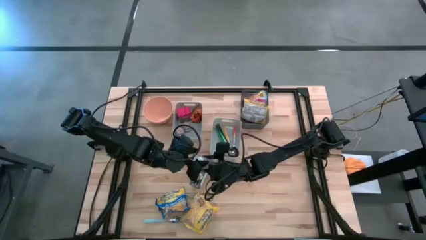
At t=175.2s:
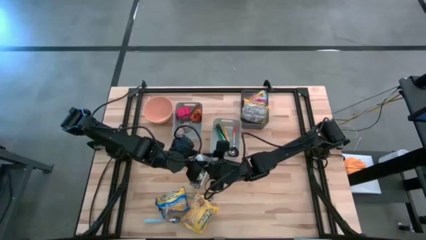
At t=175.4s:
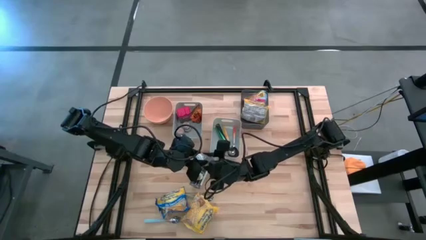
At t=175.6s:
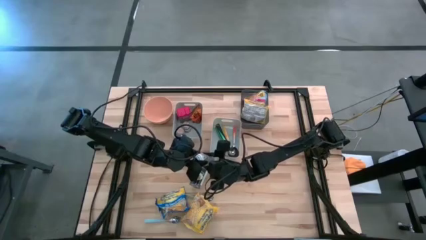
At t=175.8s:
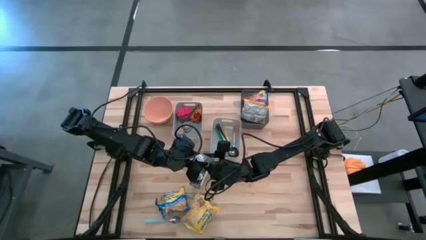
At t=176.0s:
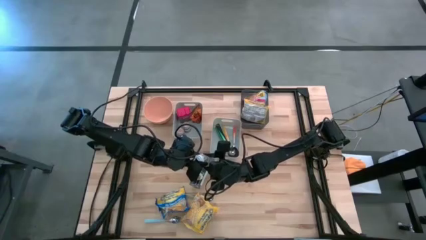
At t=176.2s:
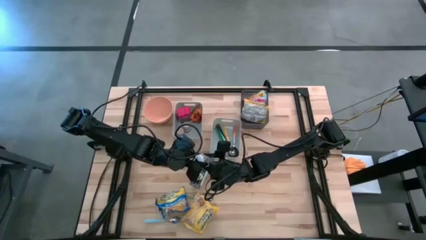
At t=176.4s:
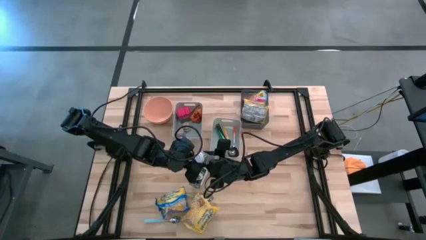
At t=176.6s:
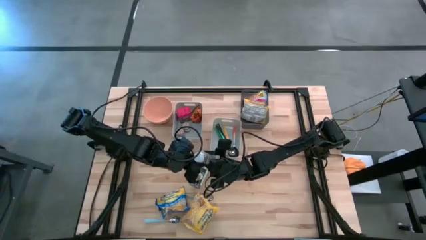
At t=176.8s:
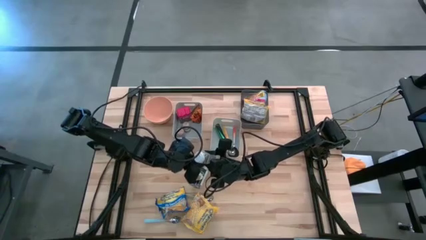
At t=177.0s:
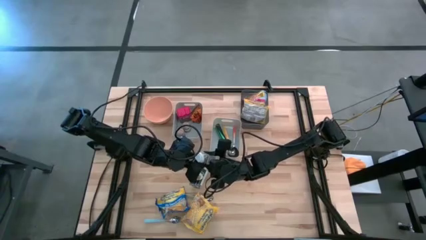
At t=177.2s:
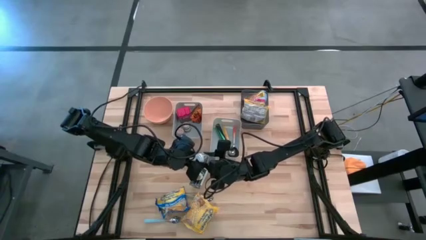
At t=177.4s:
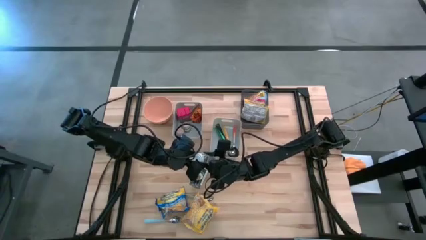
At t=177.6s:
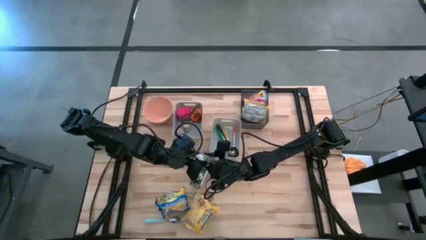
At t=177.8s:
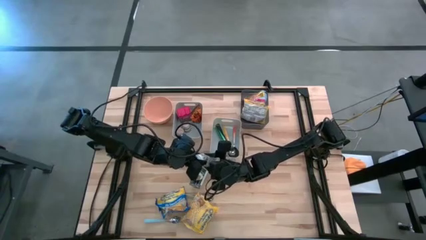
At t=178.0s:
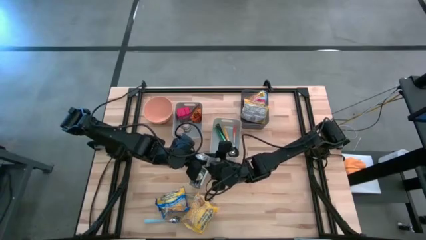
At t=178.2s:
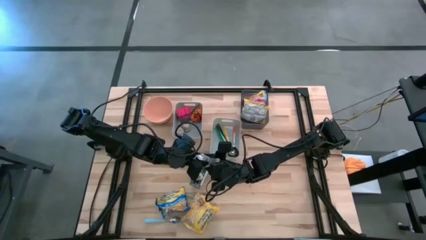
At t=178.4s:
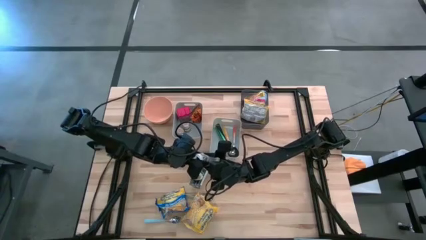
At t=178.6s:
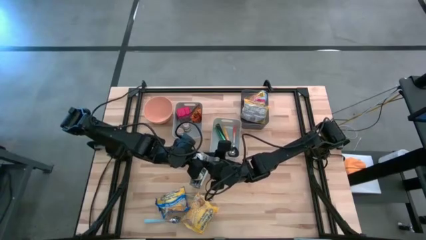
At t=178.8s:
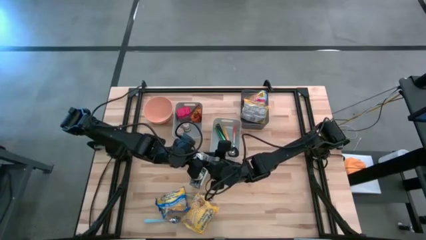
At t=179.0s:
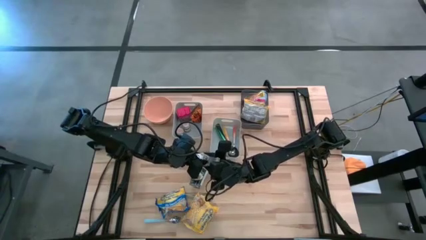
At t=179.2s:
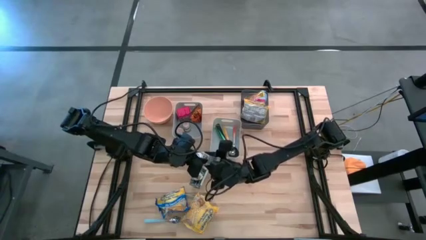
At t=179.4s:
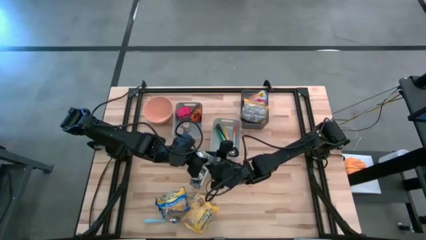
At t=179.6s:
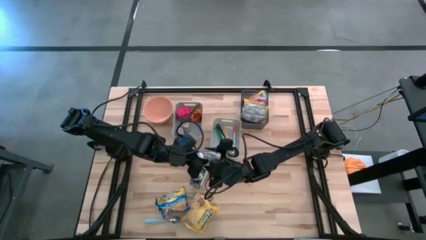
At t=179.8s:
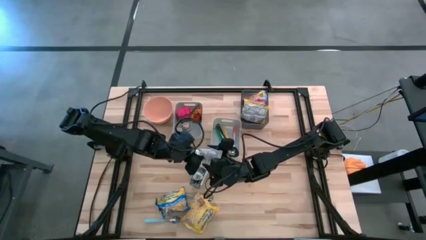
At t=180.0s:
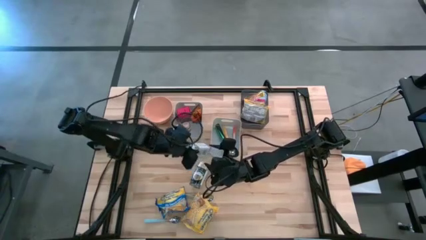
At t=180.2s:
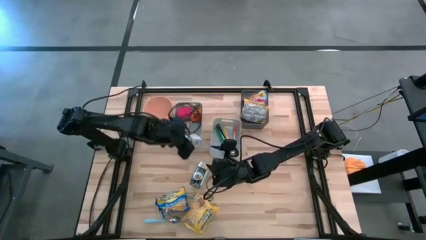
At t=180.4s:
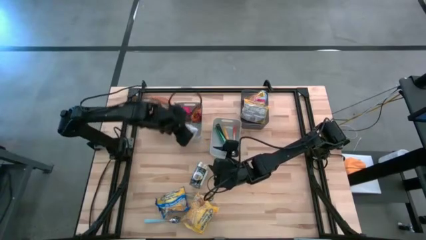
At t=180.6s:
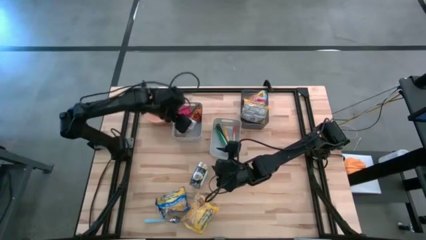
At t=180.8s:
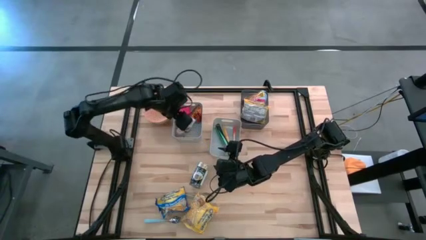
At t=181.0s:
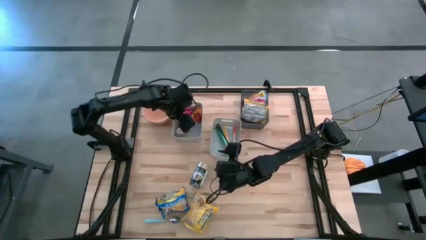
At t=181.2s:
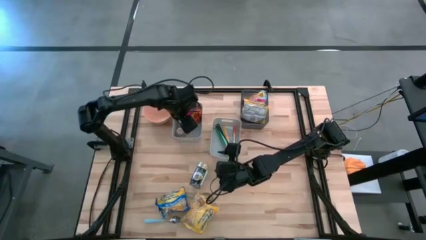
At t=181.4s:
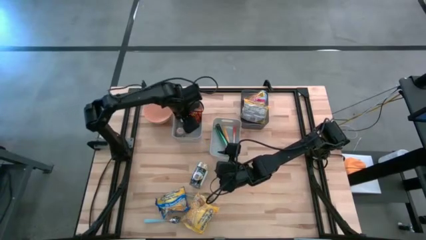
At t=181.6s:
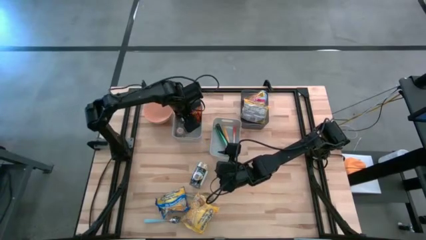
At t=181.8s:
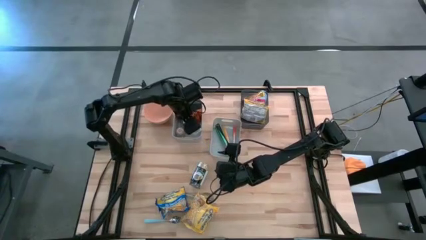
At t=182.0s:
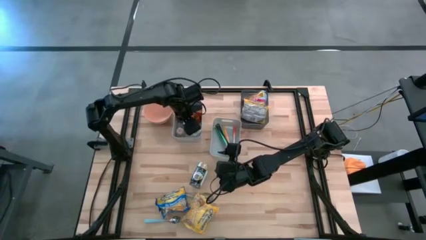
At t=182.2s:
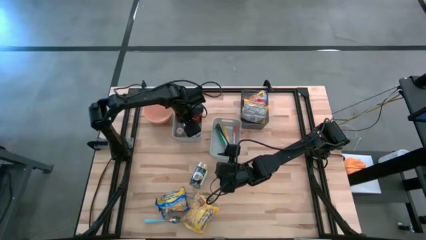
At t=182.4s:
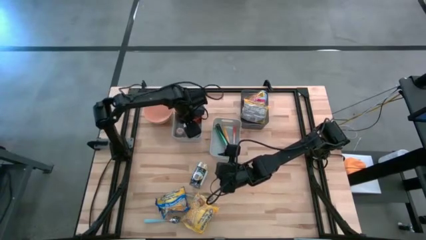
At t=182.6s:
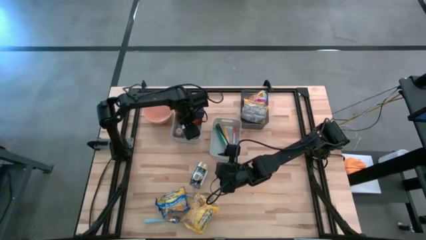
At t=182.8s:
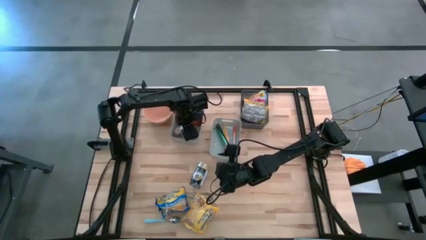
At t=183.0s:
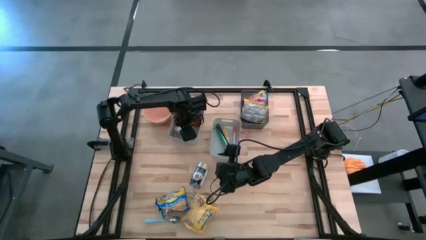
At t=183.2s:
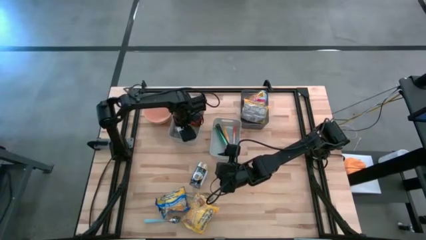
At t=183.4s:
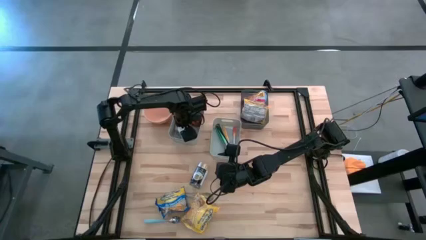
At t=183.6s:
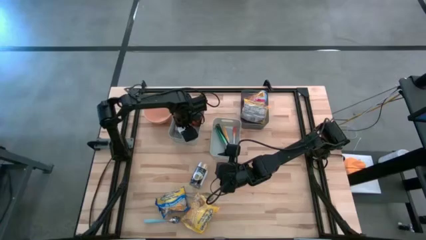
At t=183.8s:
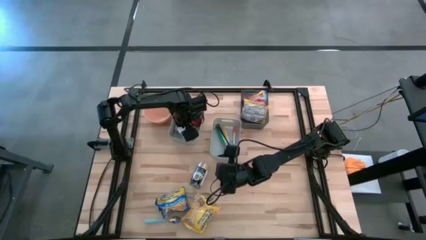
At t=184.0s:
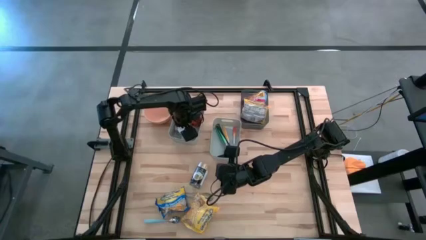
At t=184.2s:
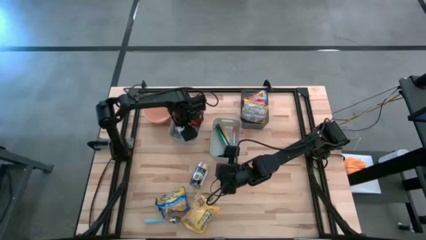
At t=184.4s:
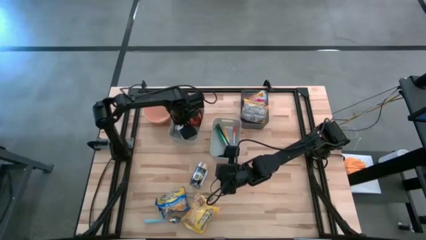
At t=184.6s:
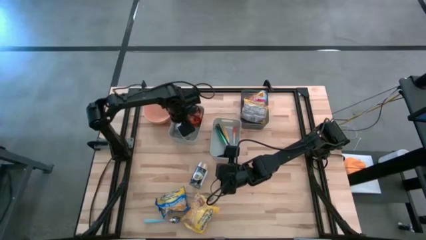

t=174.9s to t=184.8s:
Put the white seasoning bottle into the left gray bin
